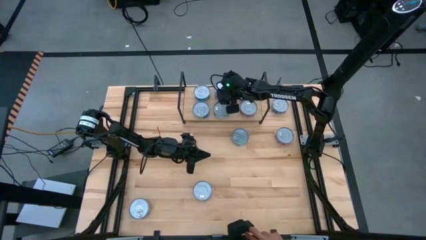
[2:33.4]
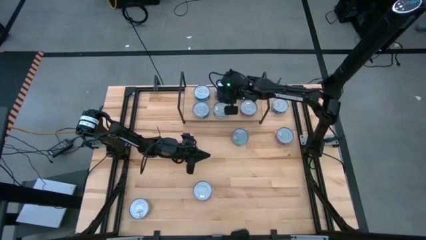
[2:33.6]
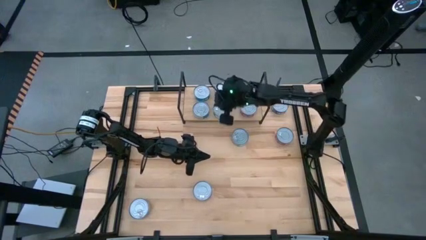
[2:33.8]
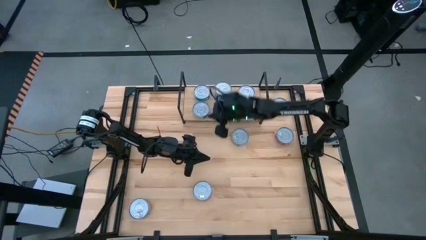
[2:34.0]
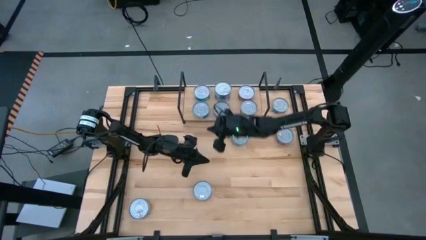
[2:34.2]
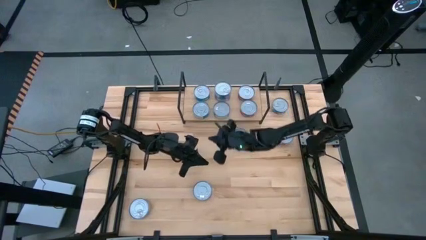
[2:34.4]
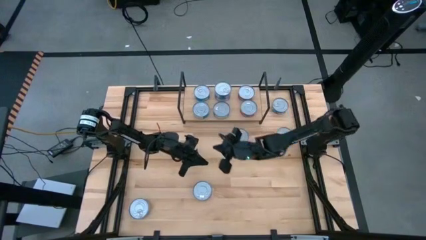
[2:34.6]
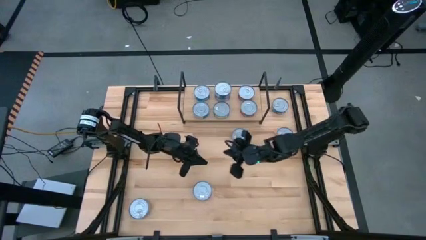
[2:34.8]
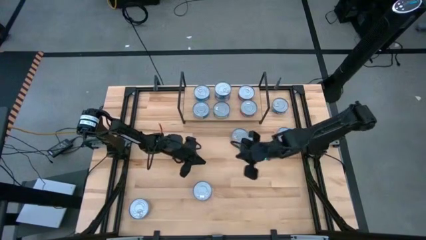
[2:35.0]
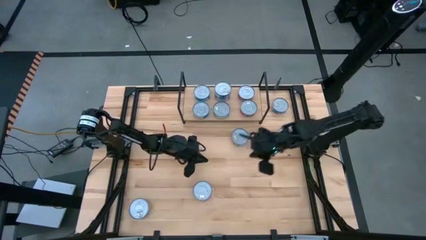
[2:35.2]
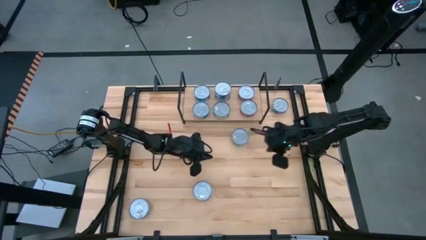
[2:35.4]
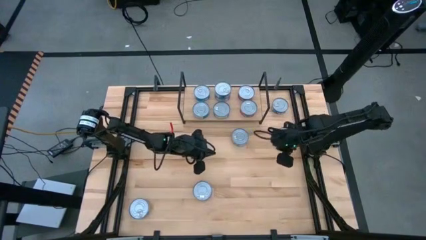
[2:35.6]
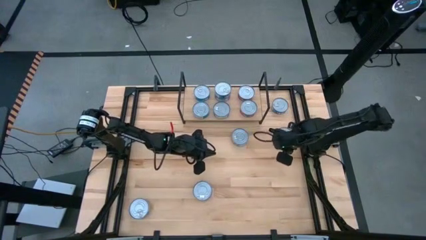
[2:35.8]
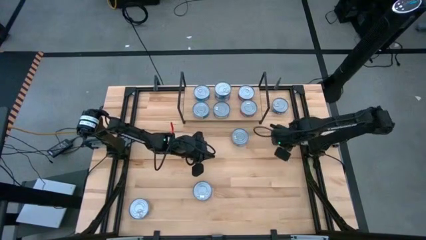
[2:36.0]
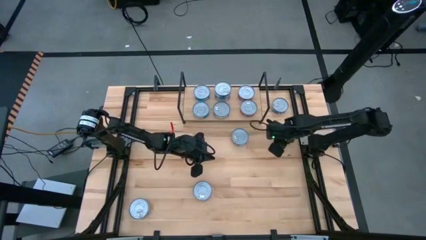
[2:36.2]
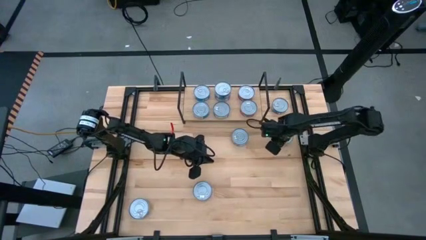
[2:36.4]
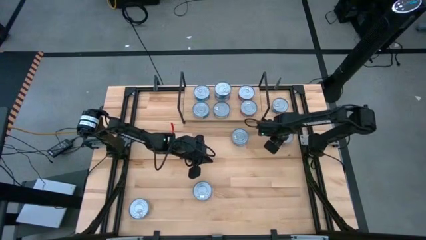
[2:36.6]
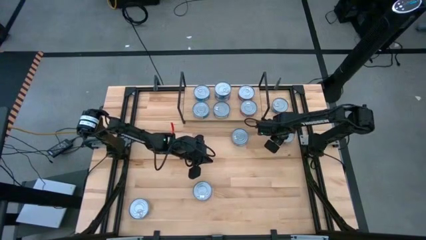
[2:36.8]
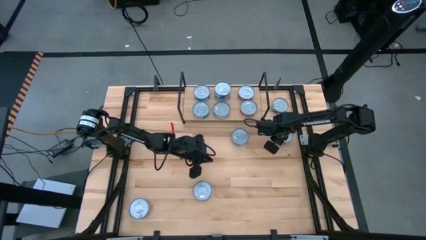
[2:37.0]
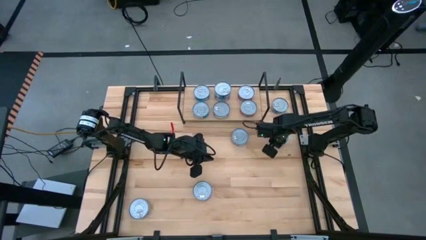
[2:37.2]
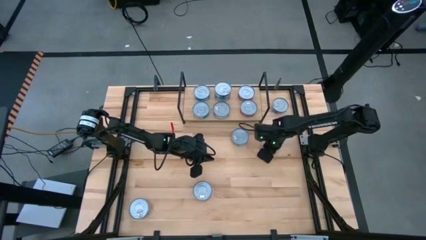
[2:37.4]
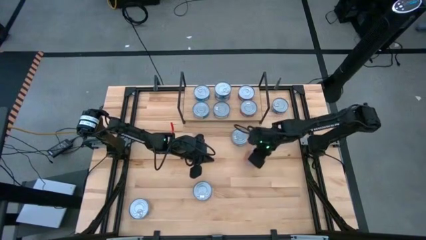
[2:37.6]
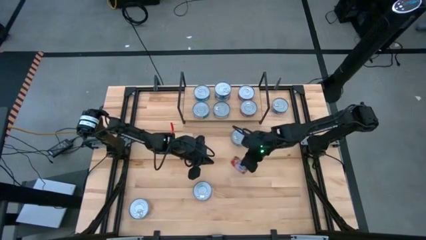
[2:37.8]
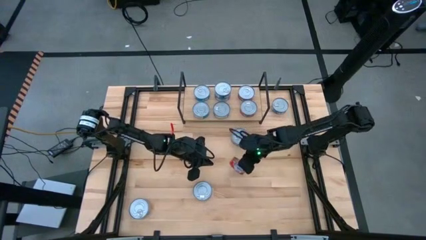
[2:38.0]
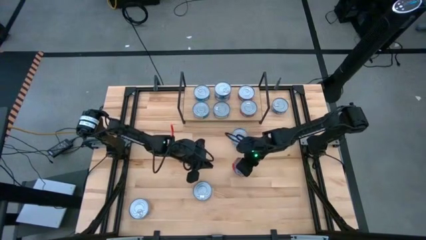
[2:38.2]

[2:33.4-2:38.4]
Task: Stack canned seafood by type on shelf
Stack the red tuna can on top of the red tuna can on the shelf

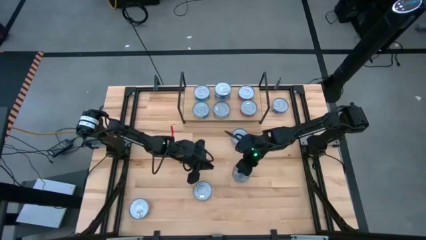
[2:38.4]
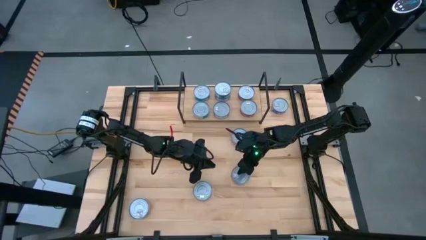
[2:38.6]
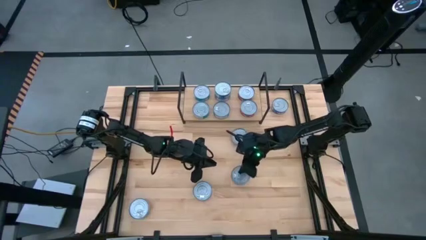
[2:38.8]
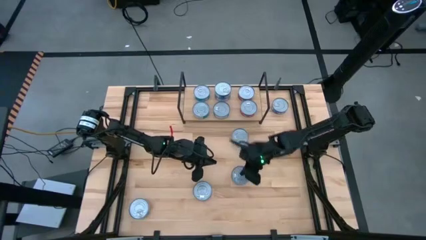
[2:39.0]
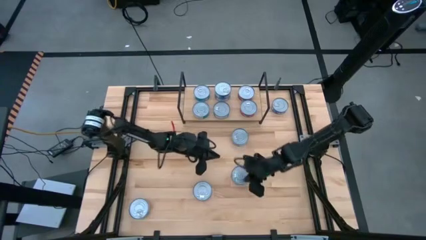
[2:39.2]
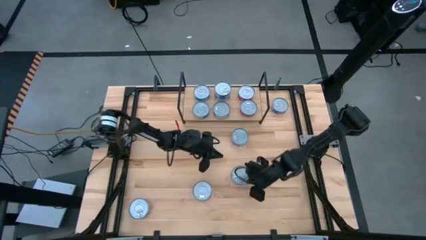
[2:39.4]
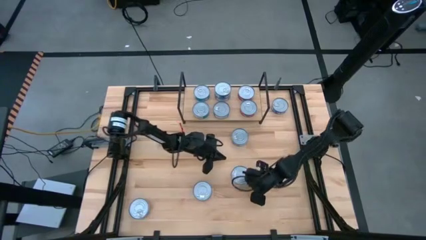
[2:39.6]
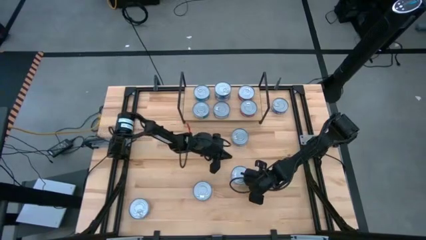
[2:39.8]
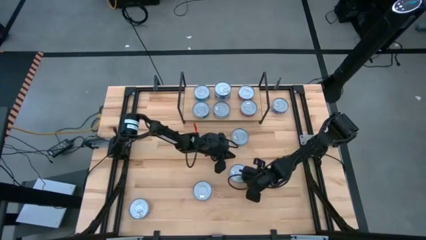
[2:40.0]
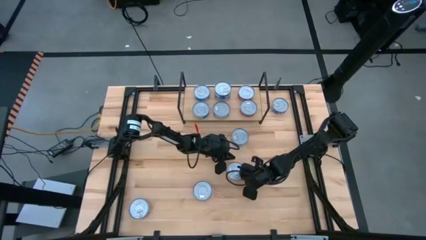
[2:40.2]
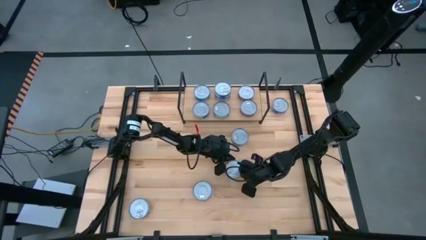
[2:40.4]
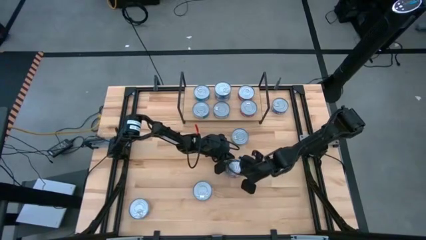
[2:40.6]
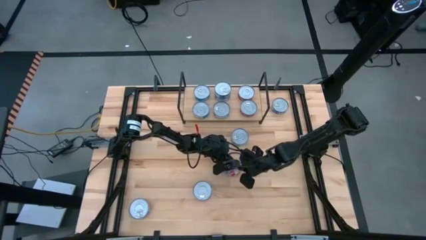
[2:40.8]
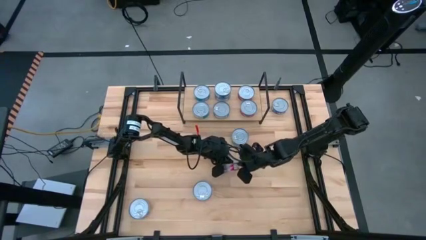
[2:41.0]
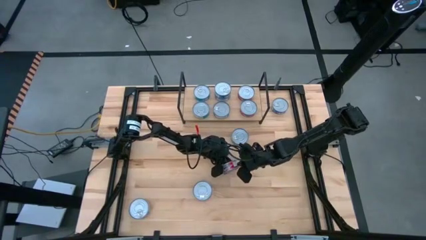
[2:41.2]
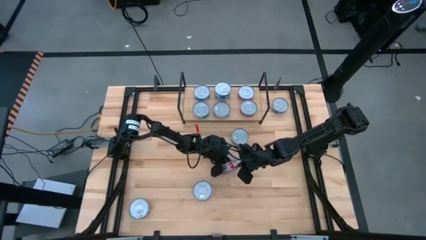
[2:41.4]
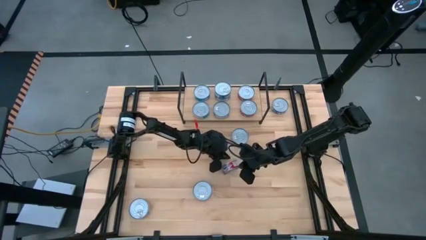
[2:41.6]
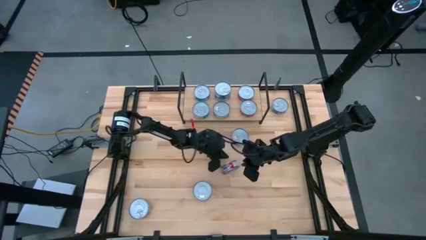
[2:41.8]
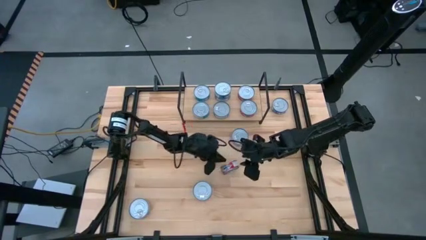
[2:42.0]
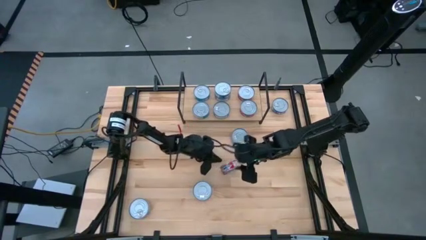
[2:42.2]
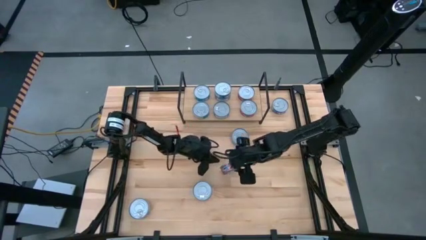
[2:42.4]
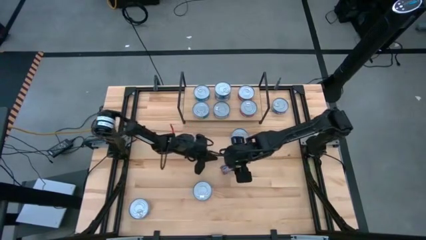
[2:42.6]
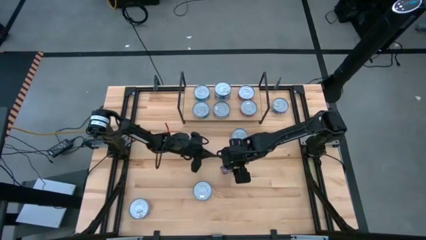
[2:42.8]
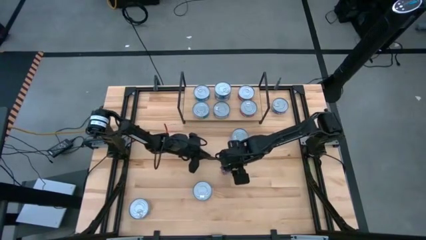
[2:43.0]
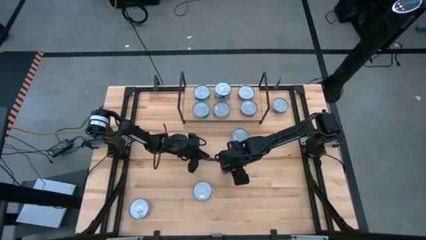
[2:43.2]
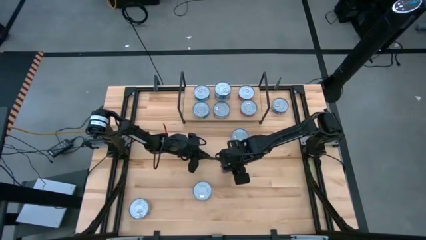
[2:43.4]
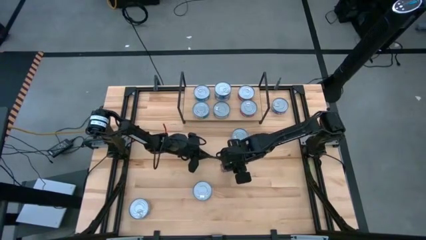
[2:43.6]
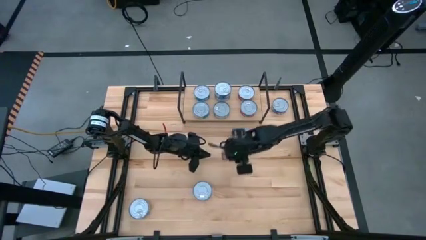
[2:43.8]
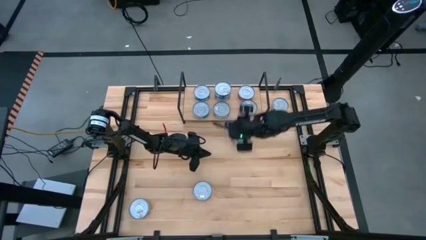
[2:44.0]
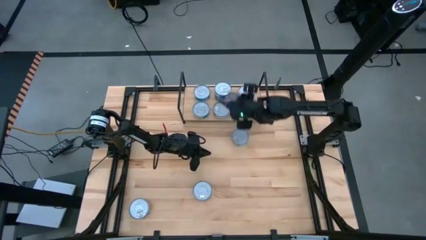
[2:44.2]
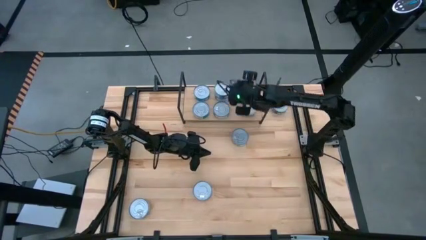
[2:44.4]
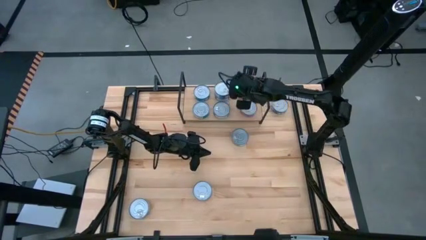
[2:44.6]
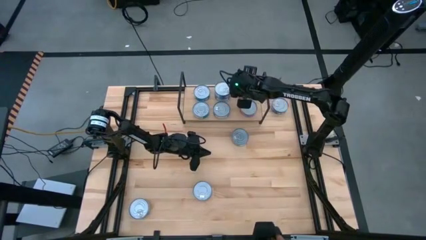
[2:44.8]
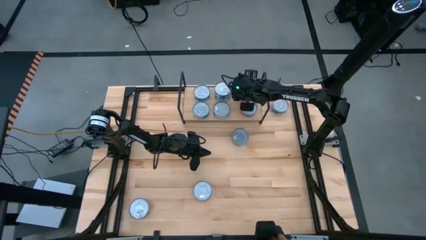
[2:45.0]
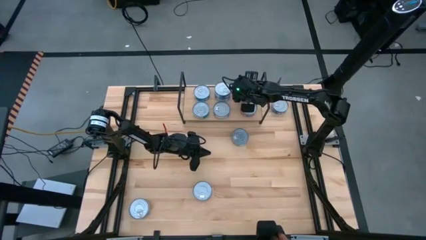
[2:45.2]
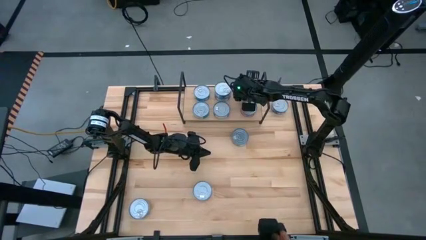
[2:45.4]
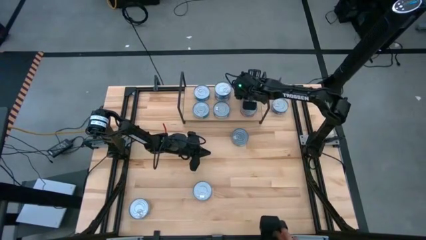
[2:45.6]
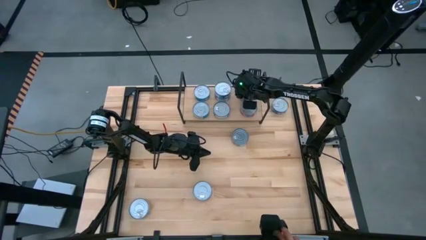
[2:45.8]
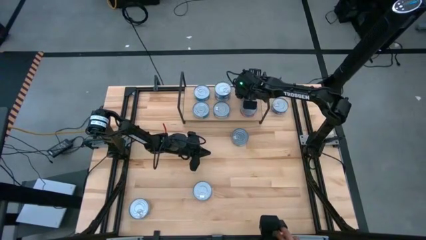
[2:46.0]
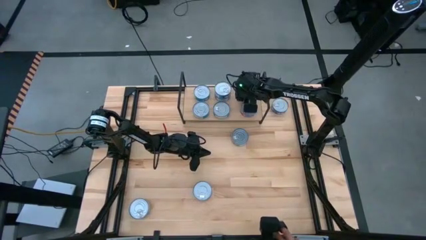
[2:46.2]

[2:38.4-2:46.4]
Stack the red tuna can on top of the red tuna can on the shelf

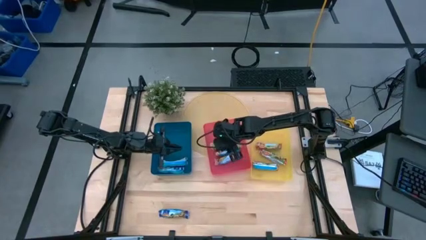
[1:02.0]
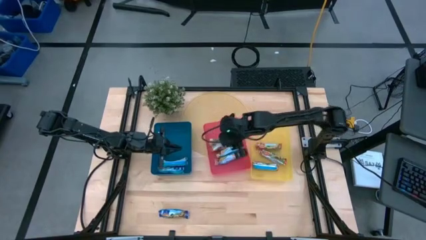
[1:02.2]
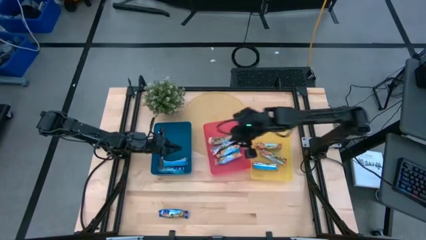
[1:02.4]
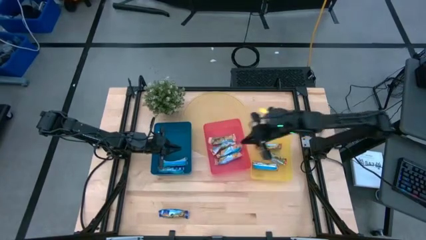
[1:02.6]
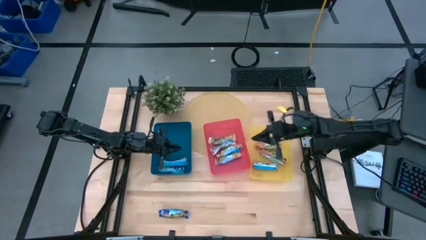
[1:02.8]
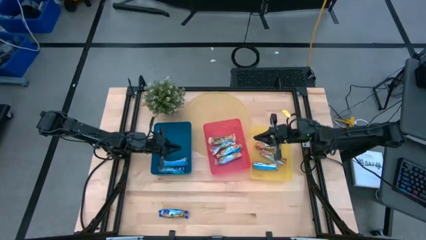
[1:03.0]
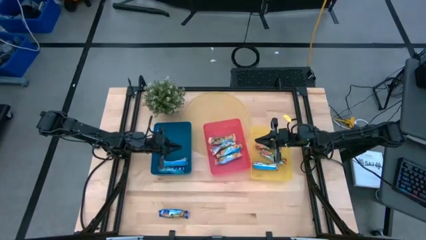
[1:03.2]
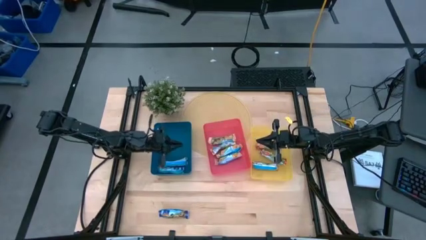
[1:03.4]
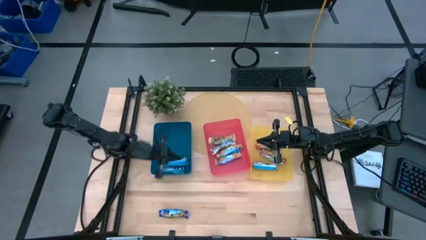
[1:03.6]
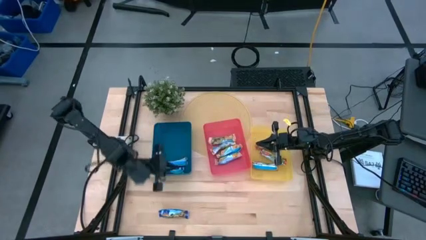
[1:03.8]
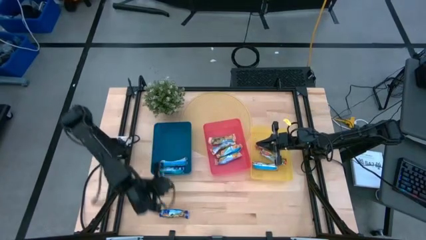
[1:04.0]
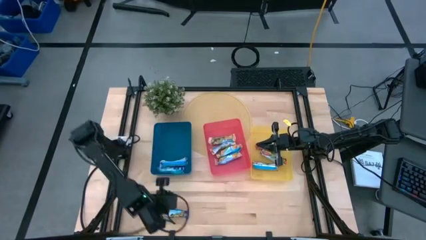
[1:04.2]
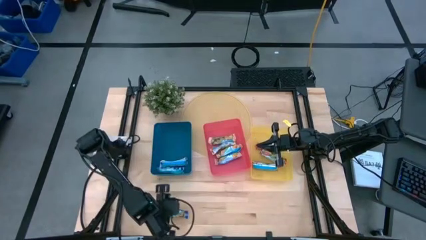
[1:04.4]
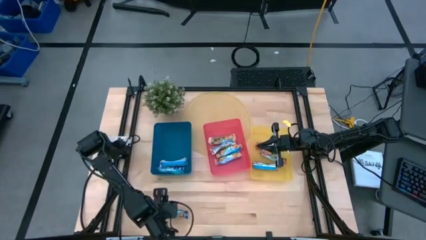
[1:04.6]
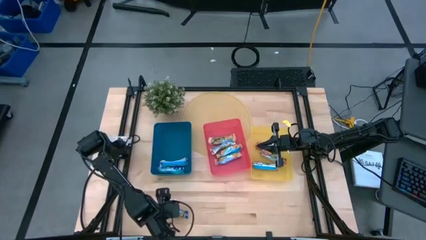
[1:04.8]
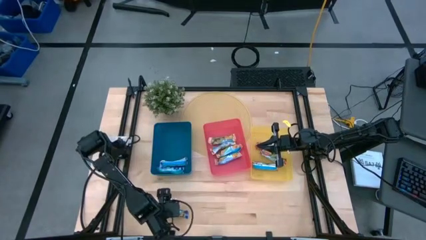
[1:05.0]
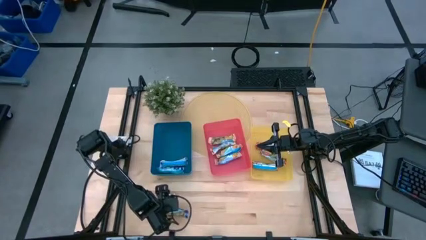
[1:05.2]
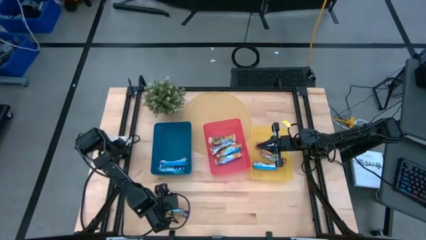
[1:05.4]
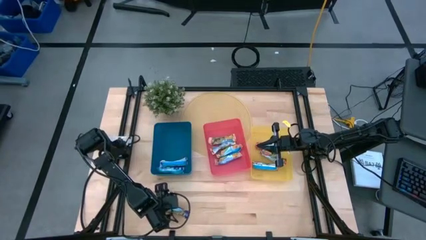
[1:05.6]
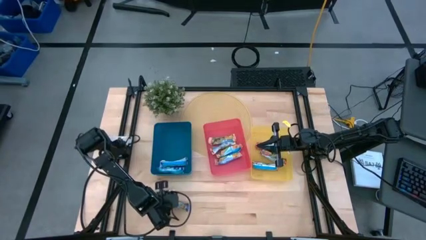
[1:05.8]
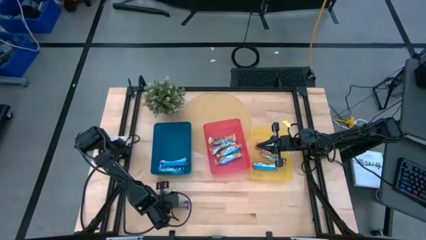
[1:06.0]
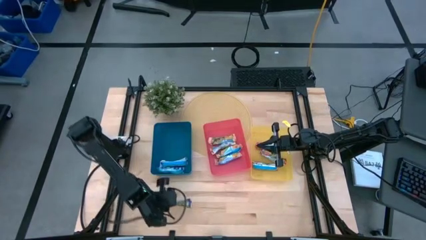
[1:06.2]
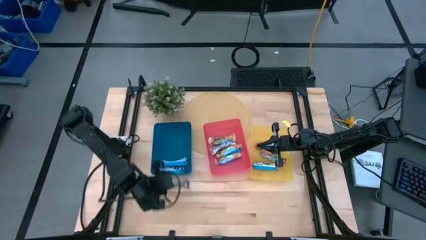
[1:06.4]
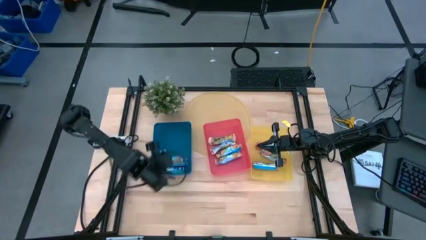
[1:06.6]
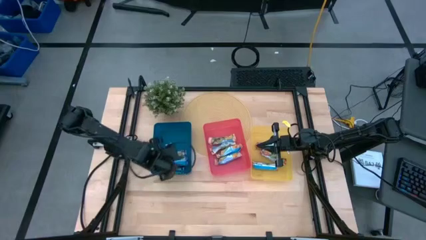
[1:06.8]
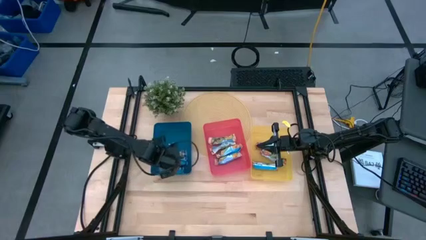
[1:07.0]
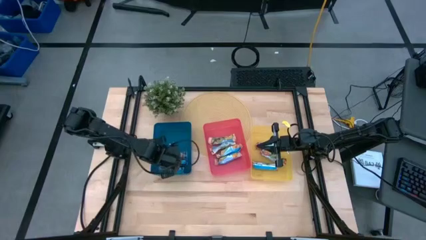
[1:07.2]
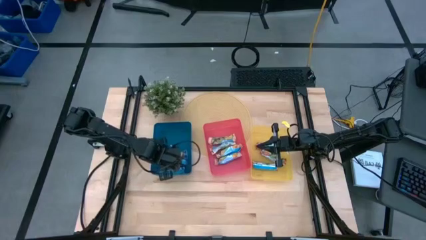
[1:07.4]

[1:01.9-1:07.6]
Task: Pick and place Granola Bars by type
Put the blue granola bar into the blue bin
